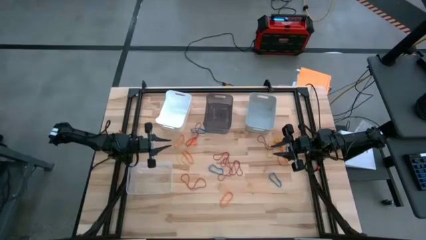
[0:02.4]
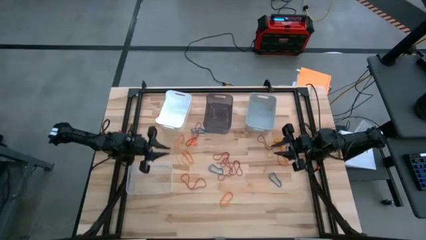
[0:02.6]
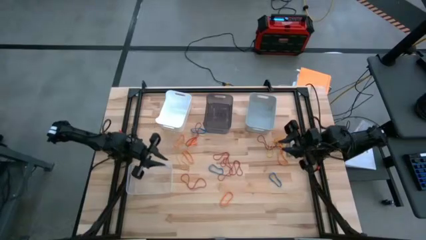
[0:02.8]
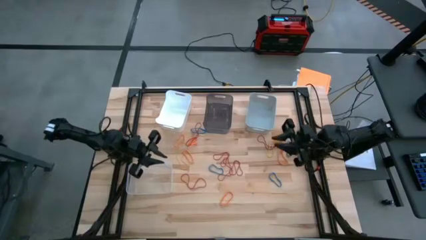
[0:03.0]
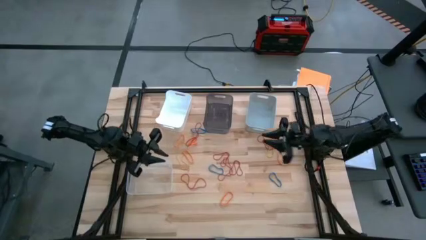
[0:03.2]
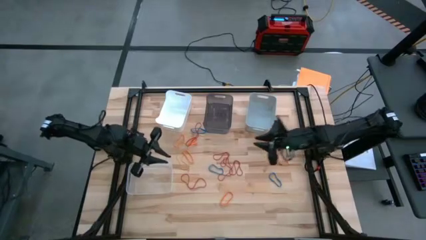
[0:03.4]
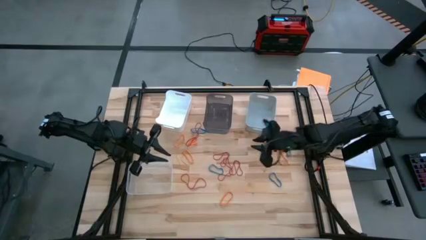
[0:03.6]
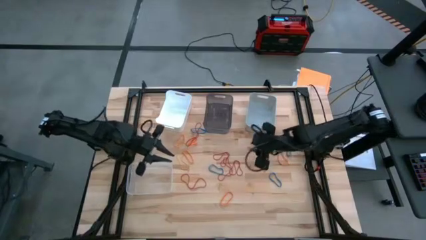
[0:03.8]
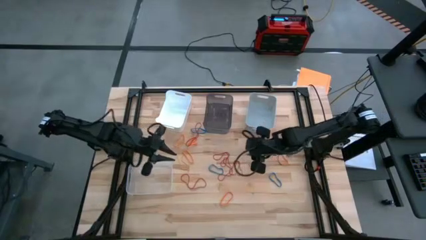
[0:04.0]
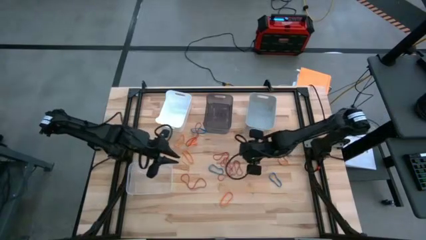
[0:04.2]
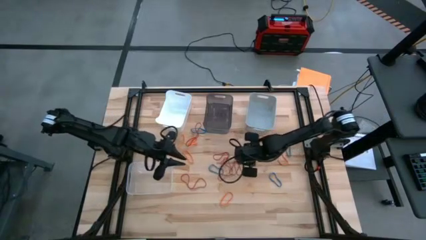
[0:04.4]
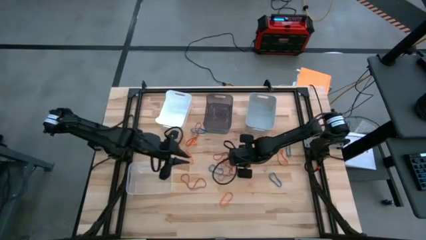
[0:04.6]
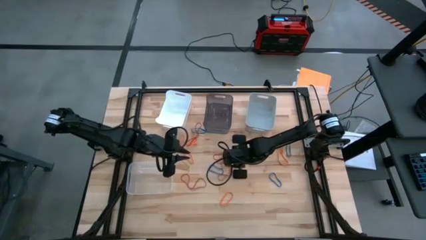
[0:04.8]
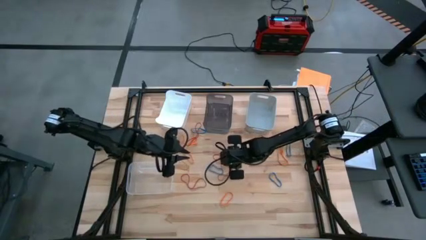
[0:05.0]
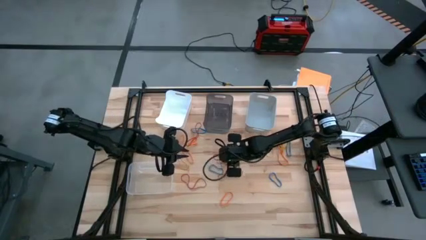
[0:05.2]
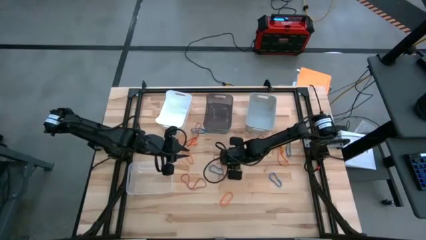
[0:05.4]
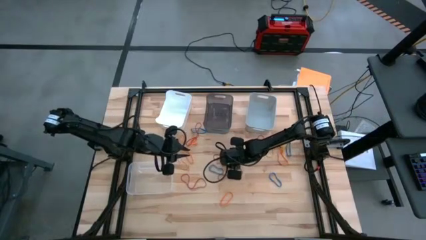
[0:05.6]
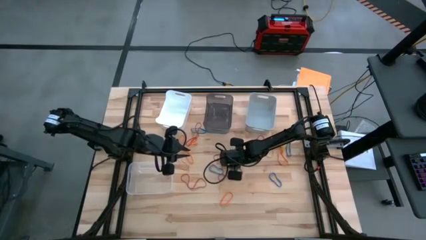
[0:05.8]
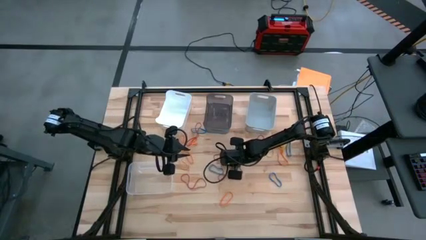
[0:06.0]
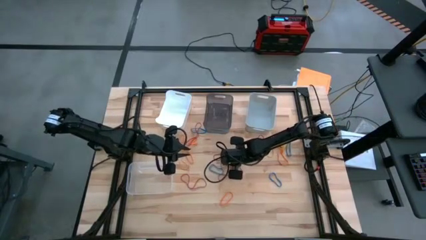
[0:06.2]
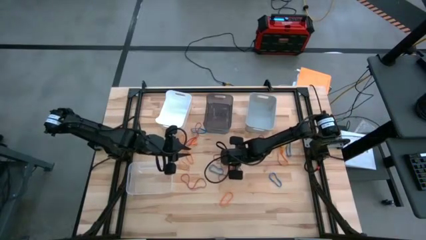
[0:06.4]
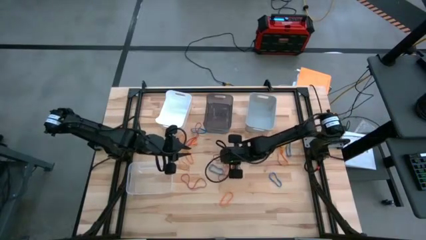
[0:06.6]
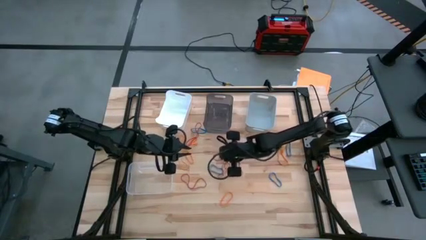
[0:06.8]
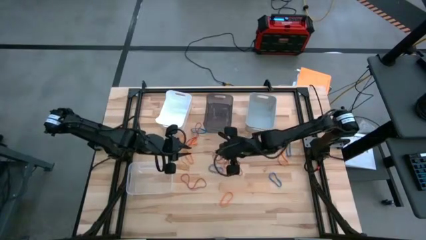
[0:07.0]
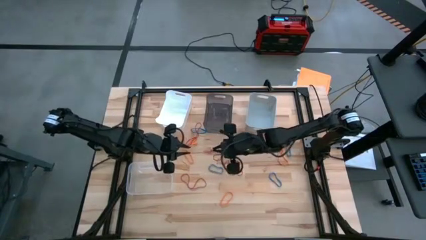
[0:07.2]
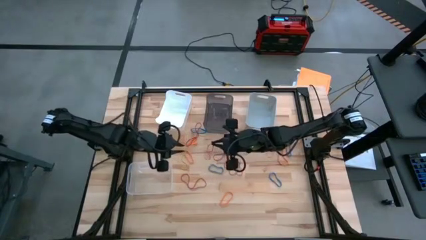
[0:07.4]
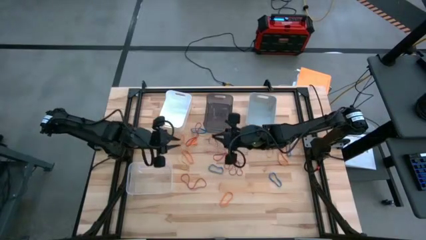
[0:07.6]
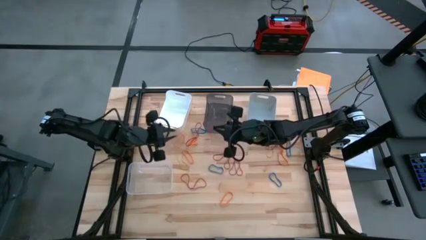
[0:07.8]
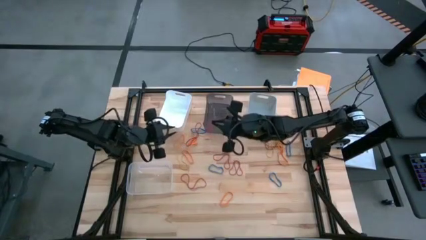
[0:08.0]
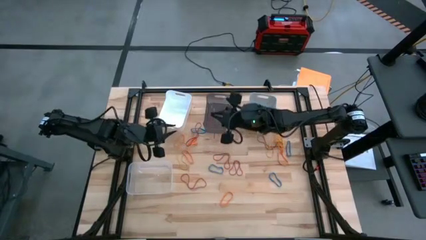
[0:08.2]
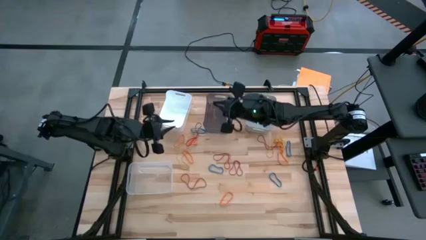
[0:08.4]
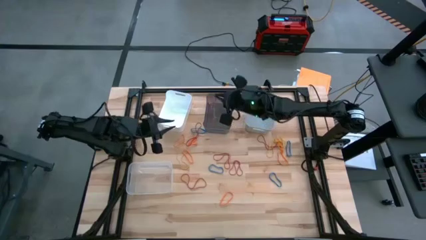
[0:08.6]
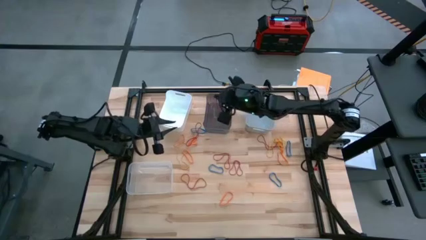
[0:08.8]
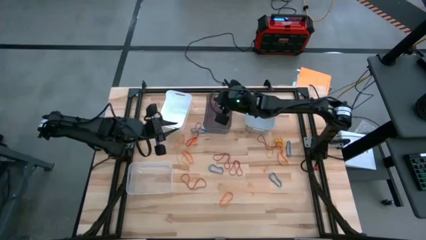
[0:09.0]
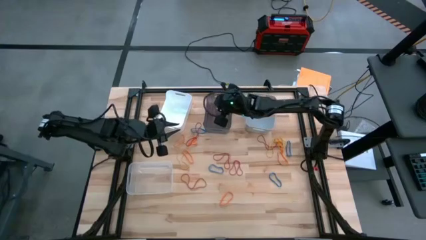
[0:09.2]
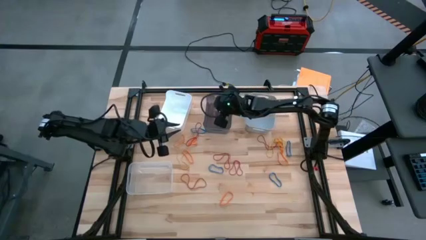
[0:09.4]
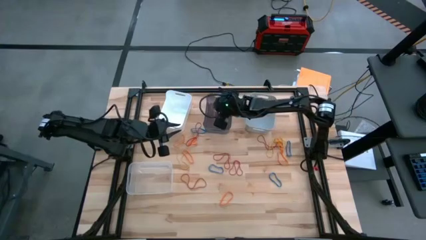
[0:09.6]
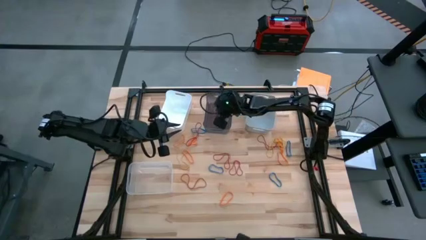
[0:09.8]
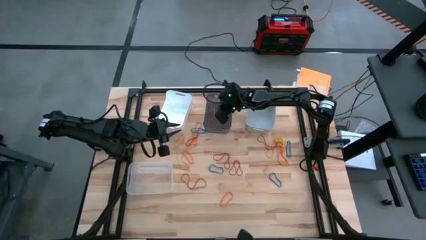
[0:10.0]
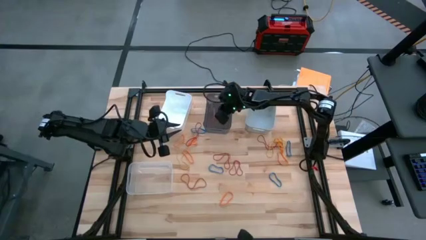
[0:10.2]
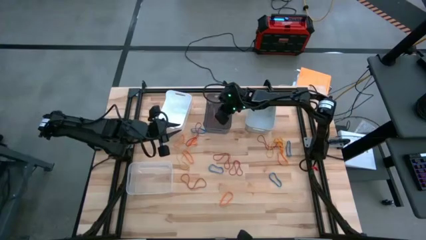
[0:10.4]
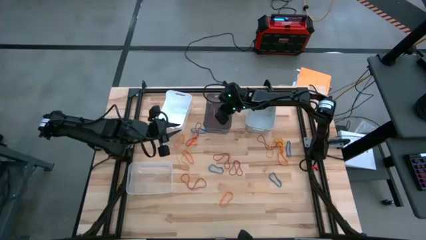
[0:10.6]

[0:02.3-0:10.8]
Task: Sort rubber bands into baskets
Put the red rubber band into the black bin

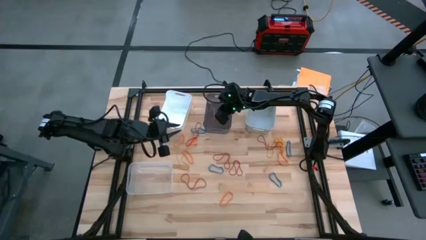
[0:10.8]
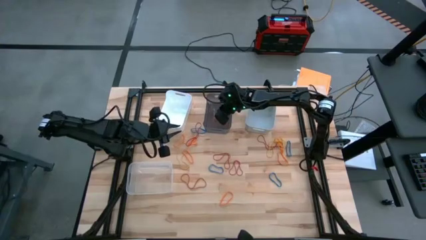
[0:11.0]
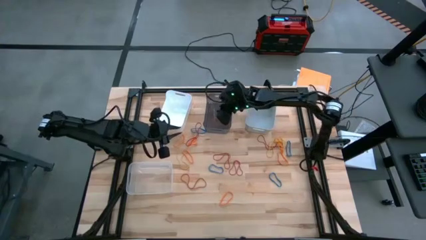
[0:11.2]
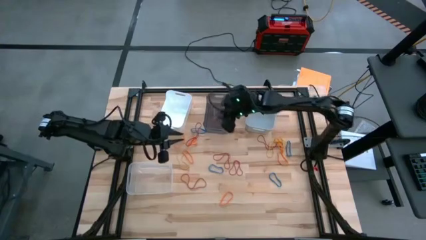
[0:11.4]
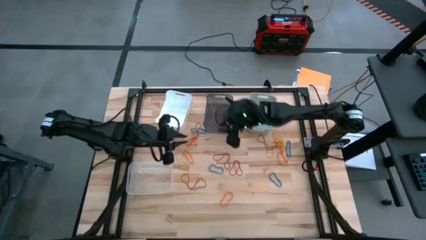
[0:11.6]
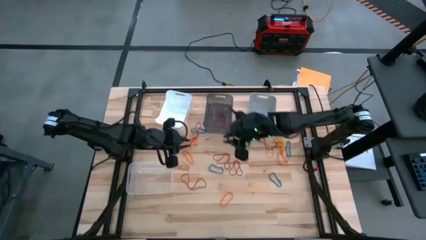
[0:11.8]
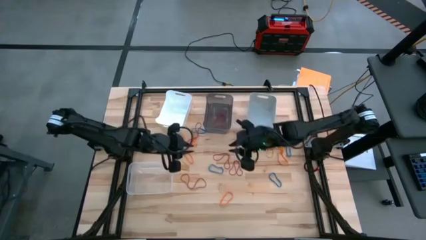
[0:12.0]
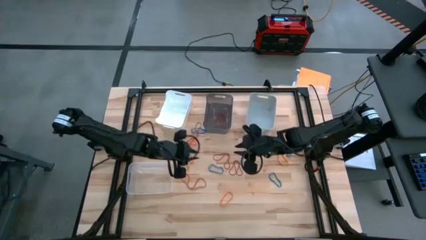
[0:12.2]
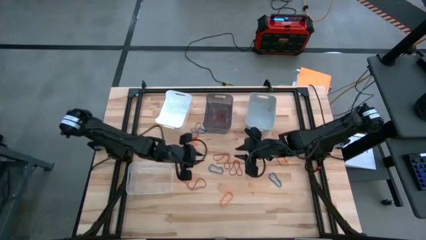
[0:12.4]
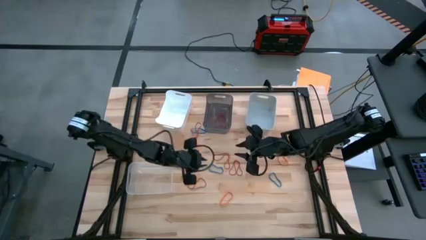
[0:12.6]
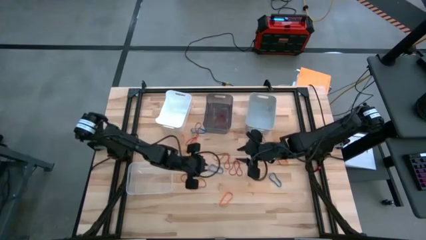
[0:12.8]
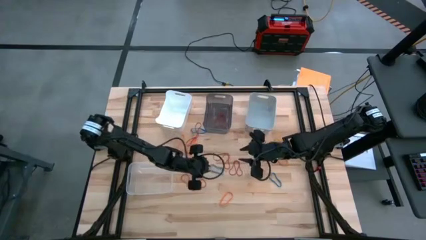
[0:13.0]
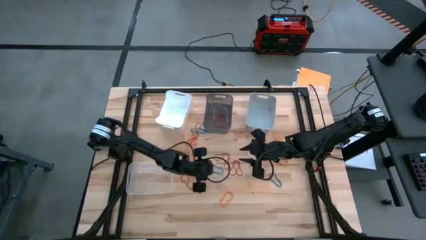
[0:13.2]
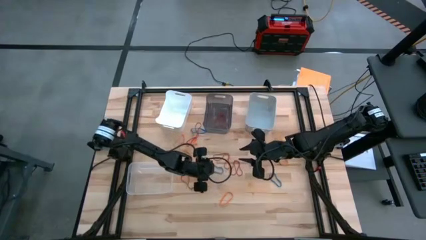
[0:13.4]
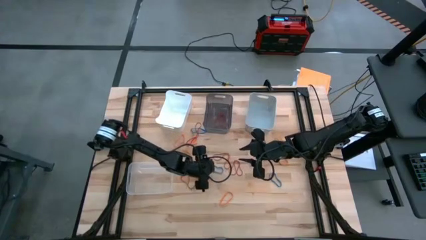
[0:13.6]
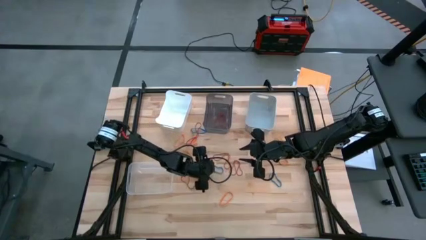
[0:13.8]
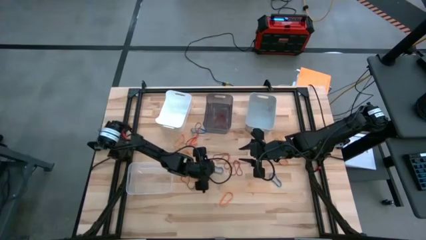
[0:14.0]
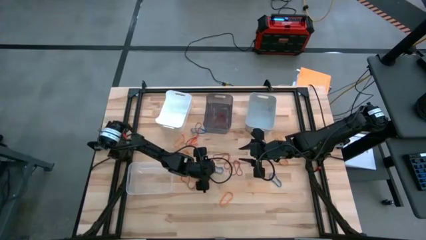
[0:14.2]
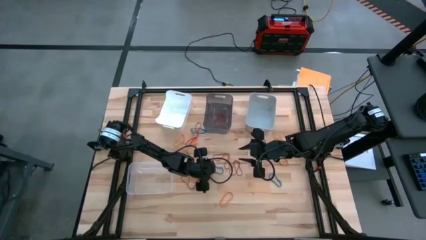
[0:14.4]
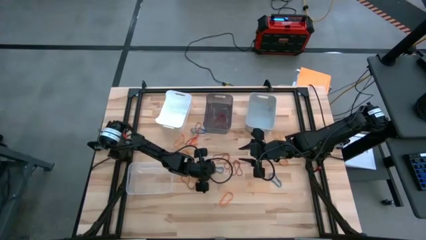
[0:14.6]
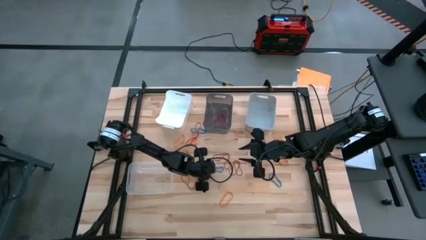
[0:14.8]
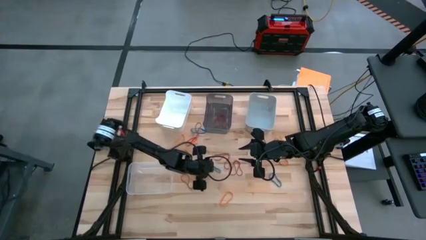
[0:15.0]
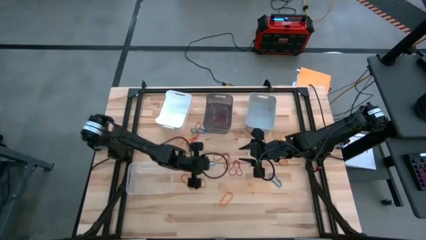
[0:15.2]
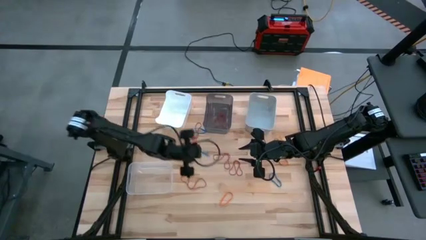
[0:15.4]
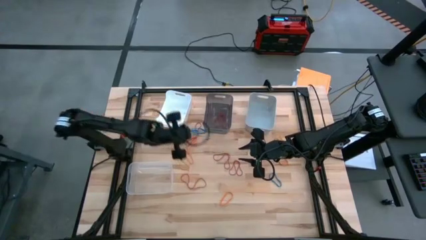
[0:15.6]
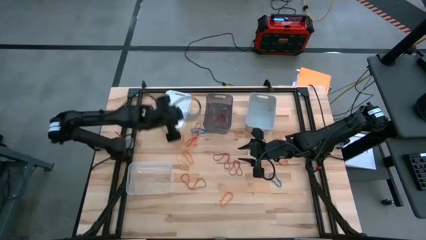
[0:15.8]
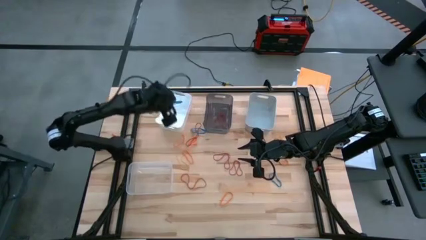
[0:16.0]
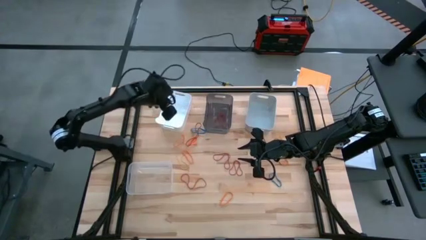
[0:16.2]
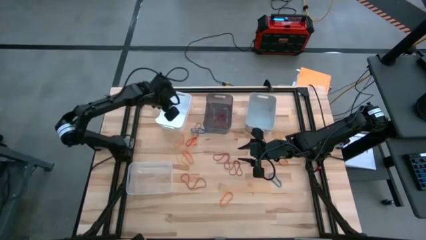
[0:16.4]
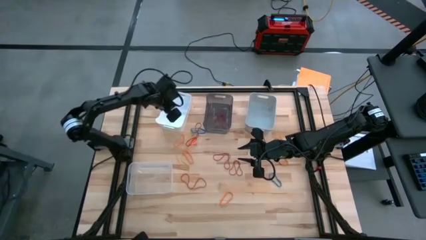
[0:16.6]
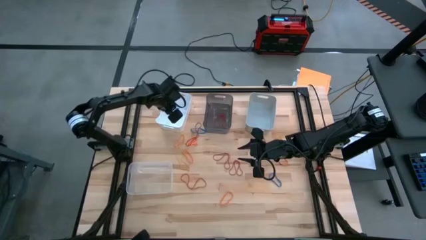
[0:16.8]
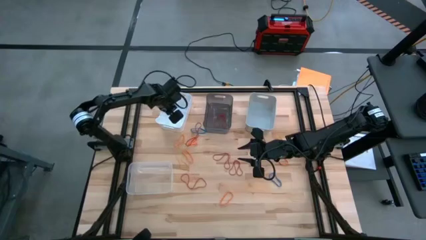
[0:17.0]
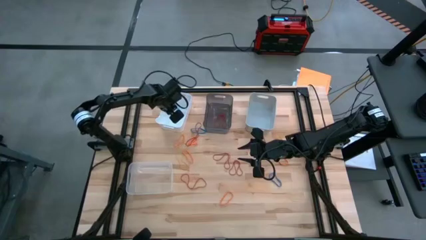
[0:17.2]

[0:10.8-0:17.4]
Put the blue rubber band into the white bin

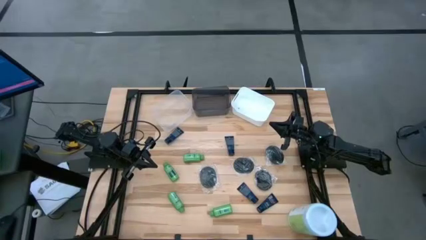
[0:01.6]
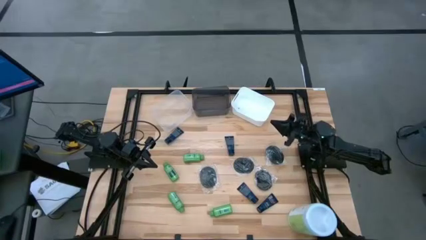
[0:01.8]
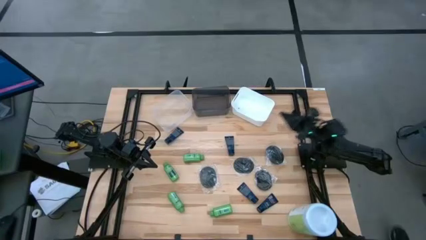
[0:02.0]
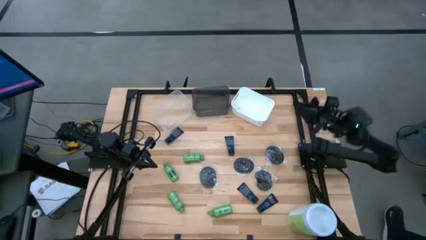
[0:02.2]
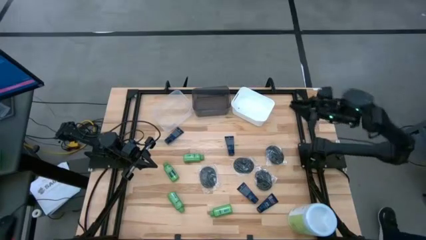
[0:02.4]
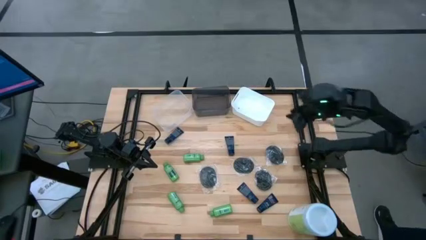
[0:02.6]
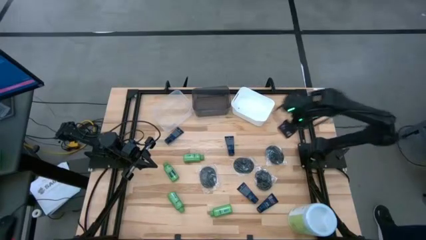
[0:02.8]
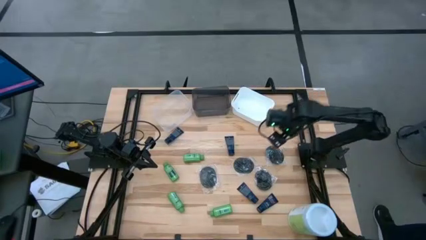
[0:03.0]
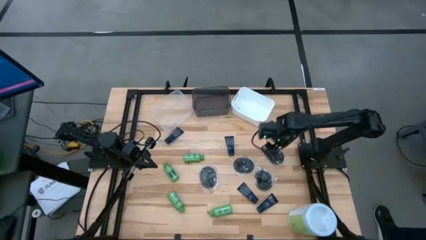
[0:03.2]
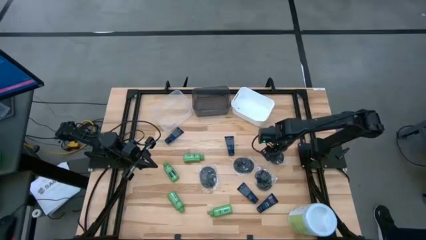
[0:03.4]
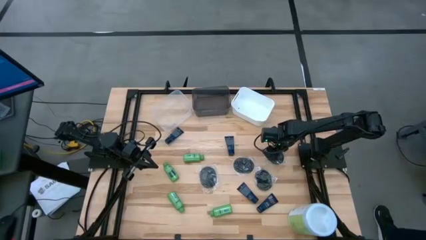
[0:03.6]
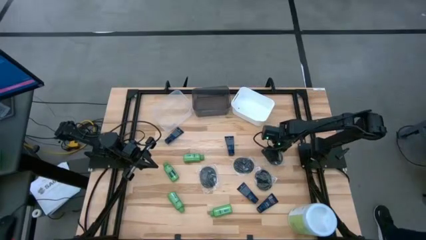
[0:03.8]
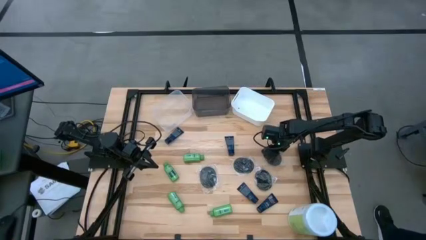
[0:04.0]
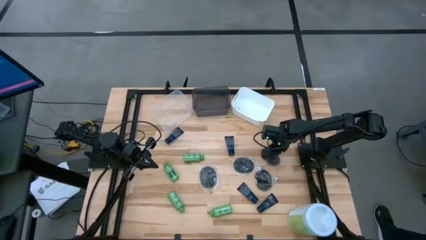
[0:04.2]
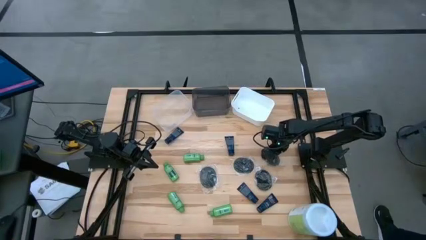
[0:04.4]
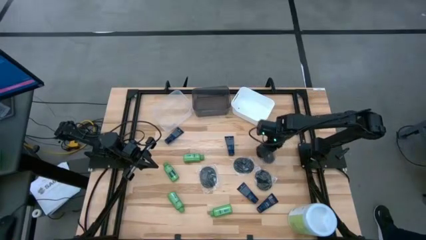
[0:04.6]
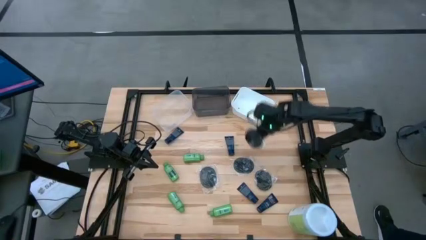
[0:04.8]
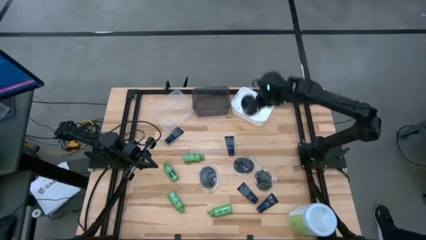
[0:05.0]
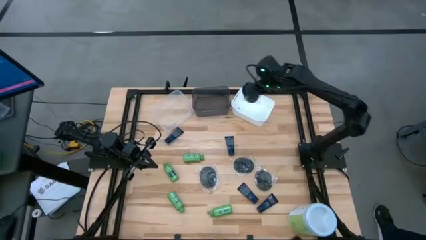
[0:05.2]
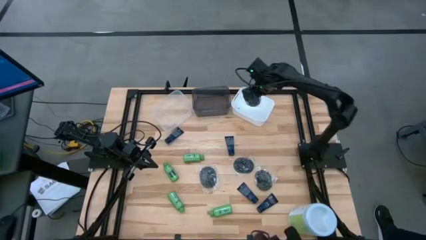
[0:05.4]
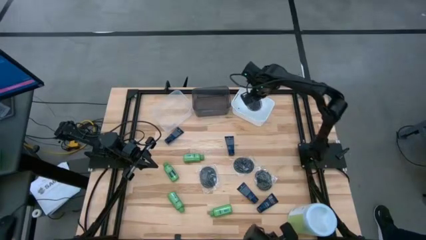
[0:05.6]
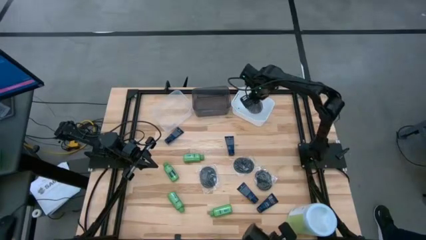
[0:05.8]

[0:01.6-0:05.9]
Task: Pick & Place Travel size toiletries
Put the black hairbrush into the white bin
